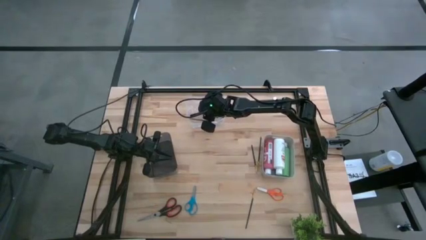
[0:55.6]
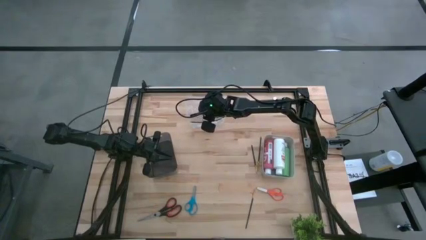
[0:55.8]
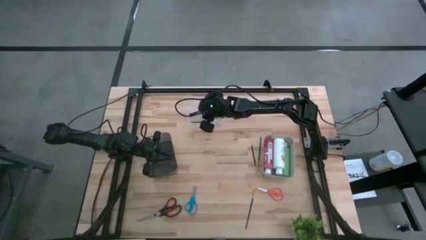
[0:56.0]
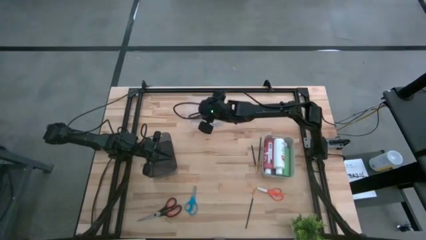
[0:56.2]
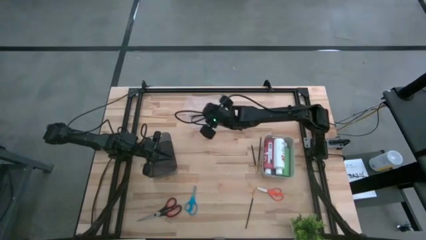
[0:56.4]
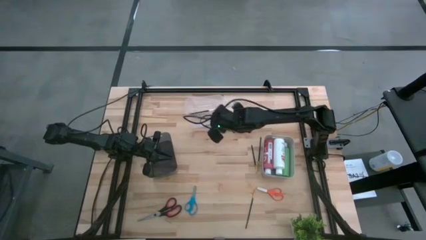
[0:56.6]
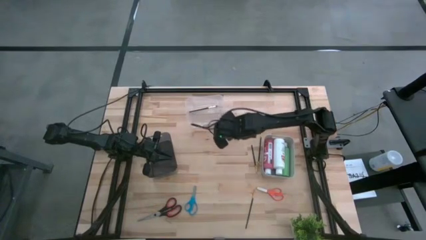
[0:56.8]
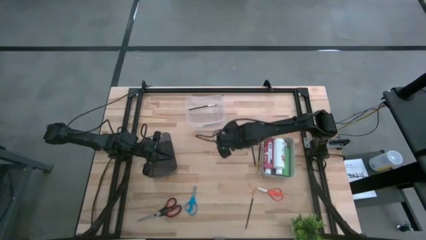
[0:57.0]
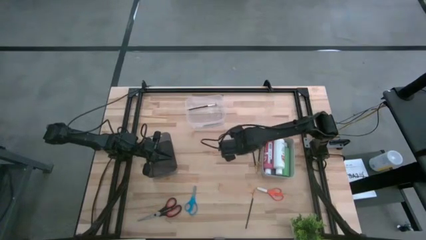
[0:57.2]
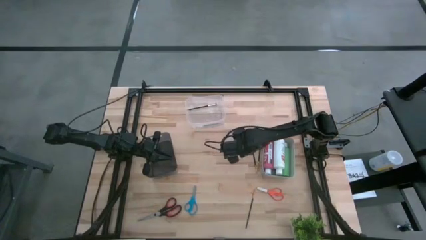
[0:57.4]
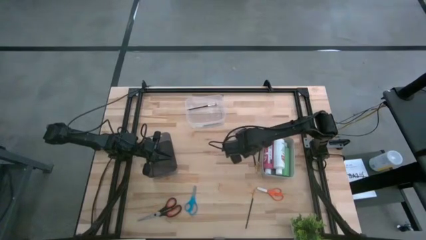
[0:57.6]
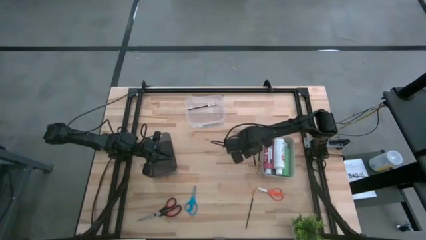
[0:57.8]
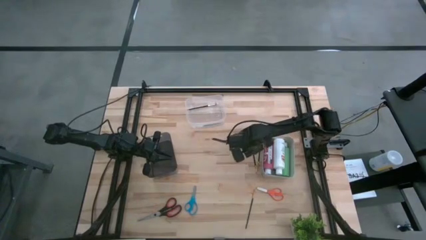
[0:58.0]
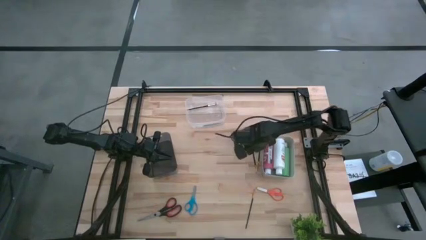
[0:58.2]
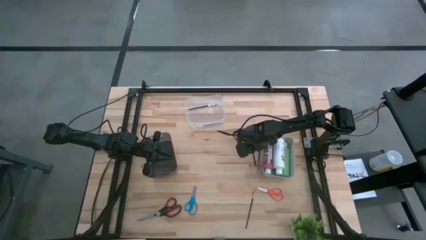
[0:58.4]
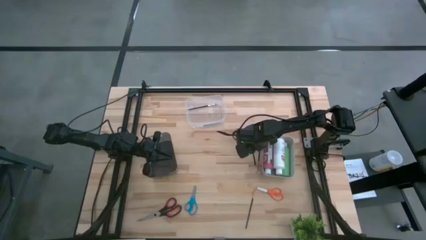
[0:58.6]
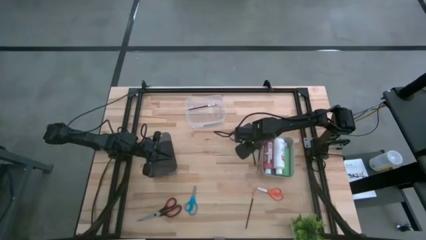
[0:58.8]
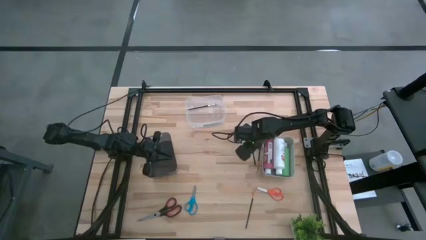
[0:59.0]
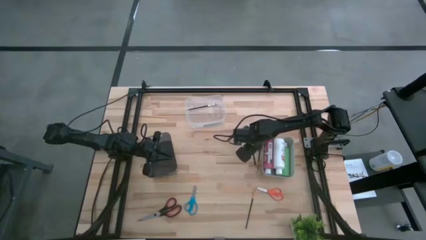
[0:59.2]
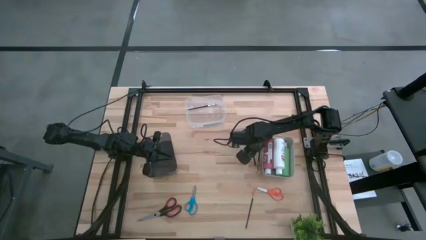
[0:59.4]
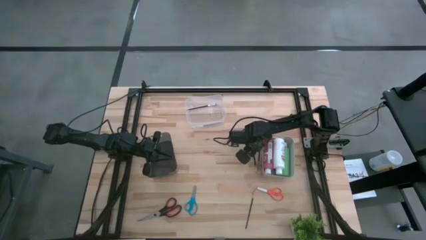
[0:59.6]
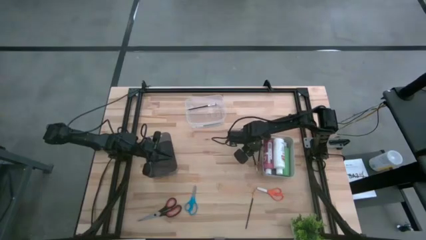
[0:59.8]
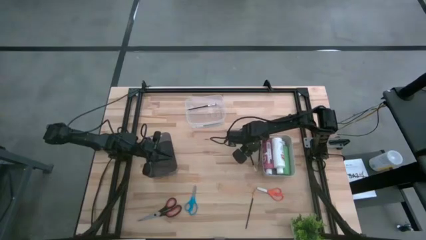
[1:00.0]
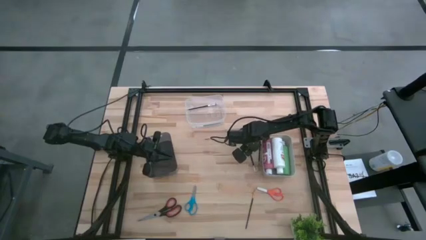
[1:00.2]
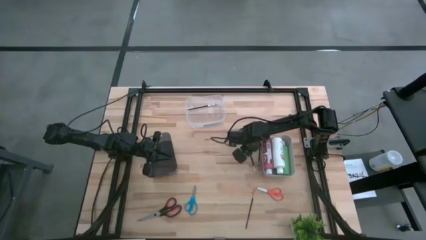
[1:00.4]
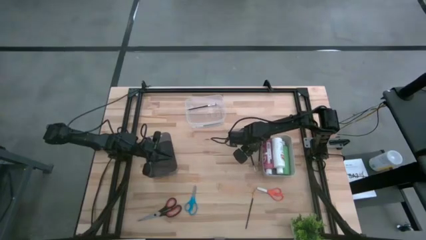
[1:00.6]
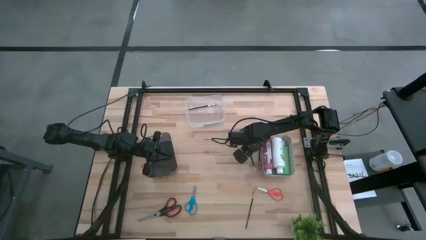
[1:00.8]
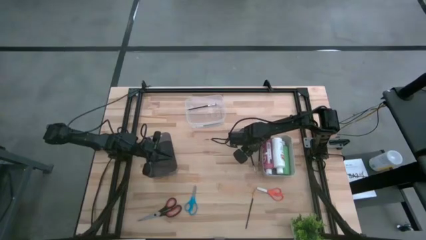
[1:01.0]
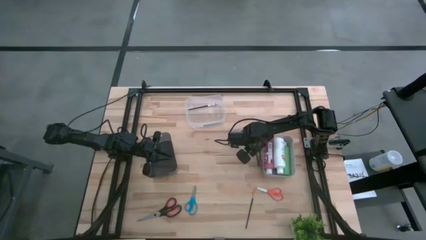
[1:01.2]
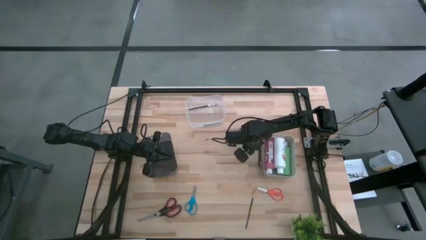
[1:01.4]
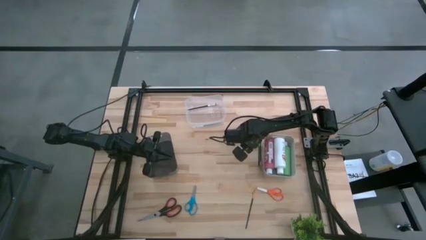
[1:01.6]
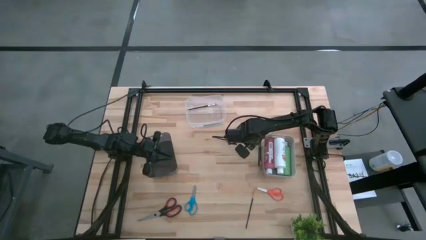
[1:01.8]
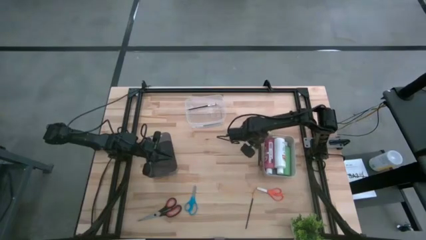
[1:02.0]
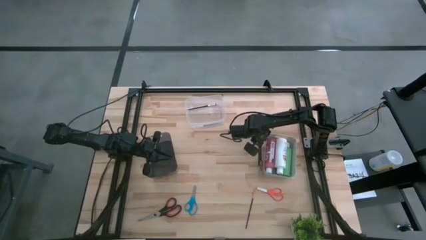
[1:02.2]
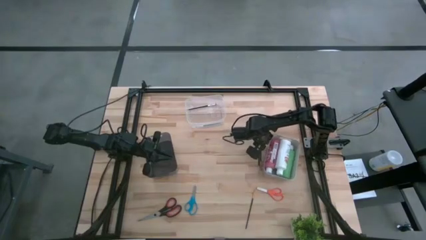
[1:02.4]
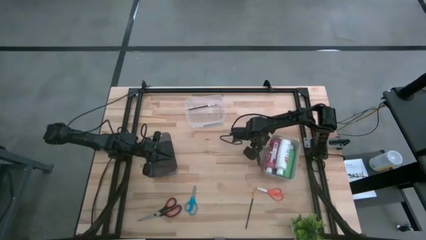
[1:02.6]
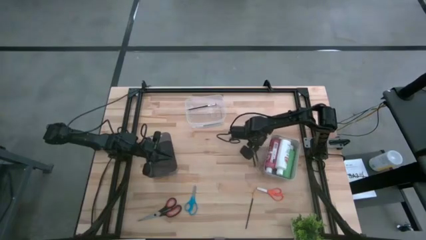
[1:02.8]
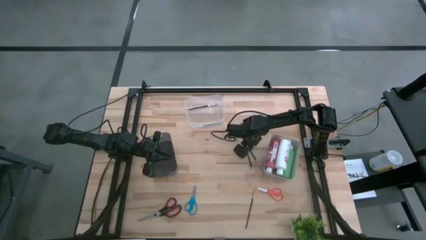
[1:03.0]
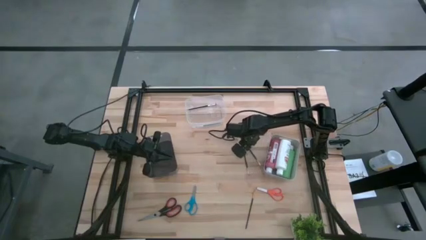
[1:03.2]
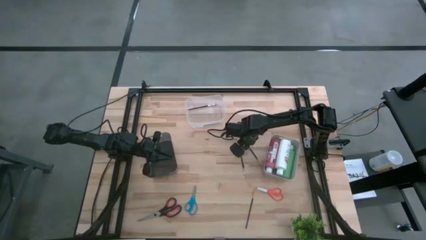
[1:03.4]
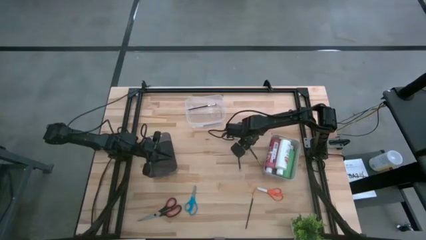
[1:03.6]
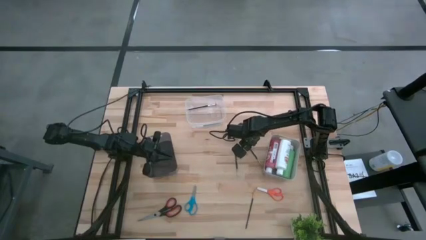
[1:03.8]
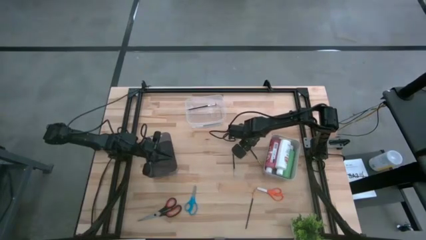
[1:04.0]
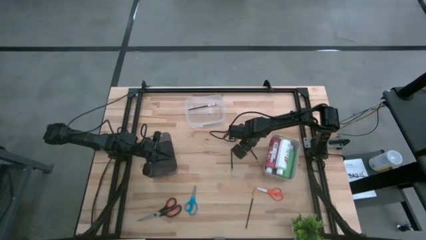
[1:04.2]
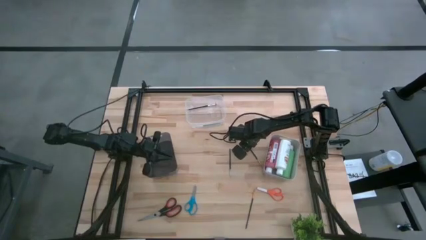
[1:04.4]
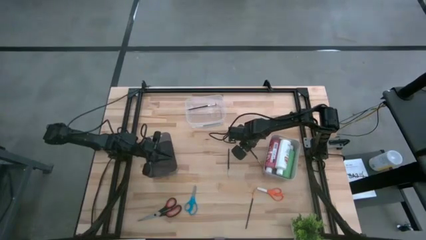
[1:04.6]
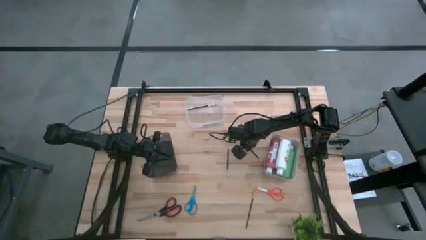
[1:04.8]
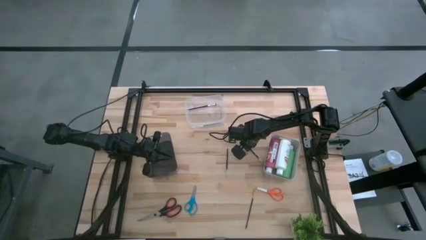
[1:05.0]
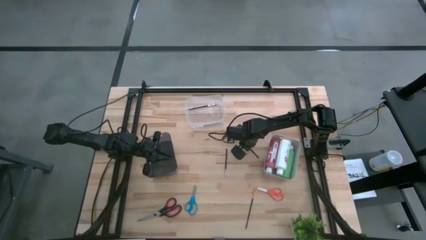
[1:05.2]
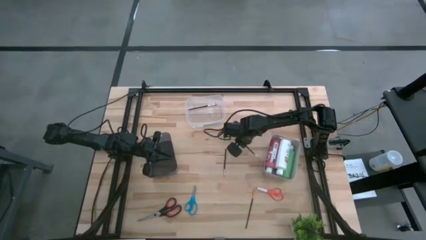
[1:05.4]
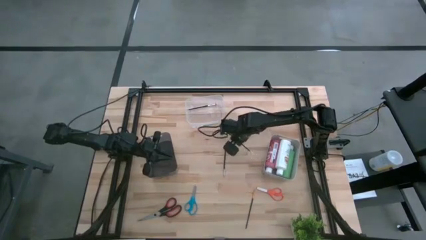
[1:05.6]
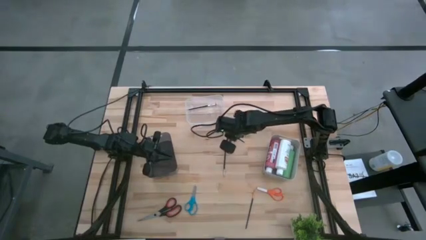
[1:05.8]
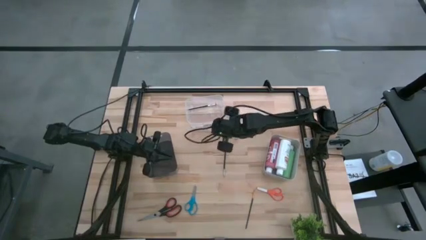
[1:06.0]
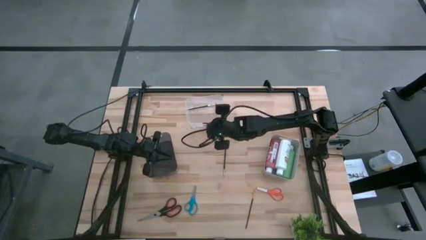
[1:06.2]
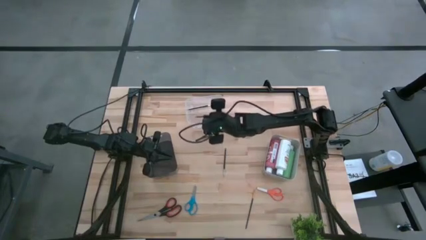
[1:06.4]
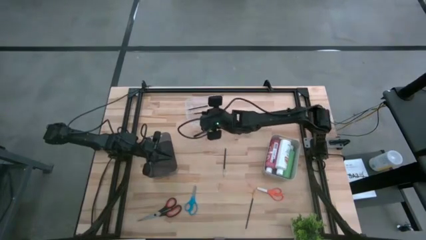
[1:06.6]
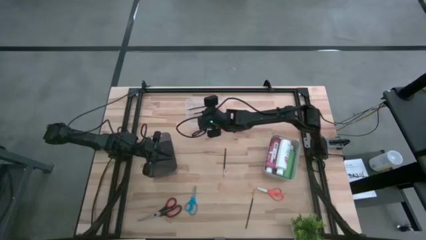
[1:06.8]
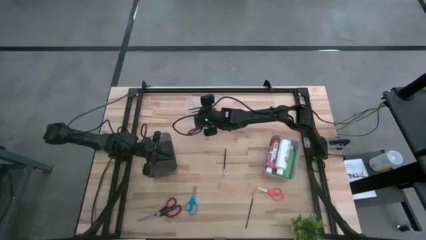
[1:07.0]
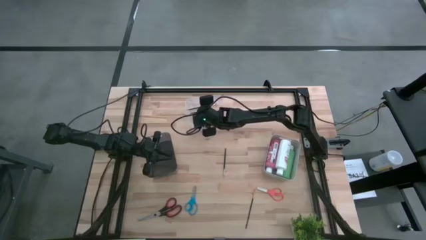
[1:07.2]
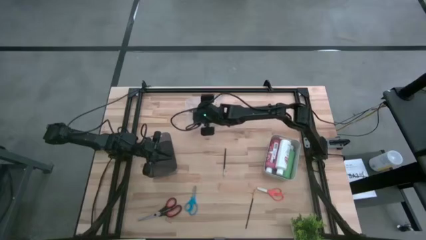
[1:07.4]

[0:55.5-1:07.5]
Task: Pick & Place Paint Supplies
Put the gold paint brush into the transparent bin

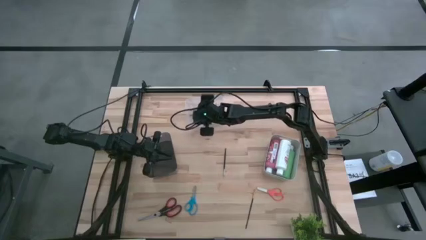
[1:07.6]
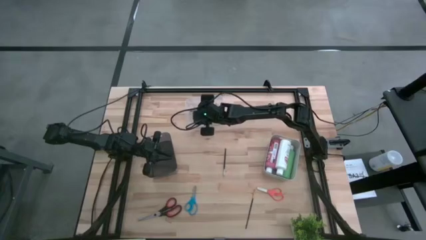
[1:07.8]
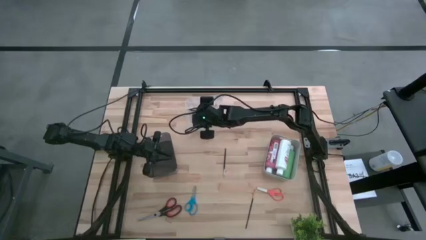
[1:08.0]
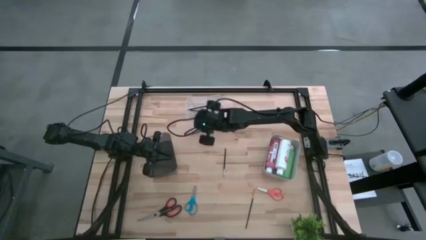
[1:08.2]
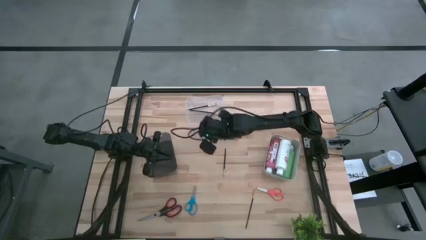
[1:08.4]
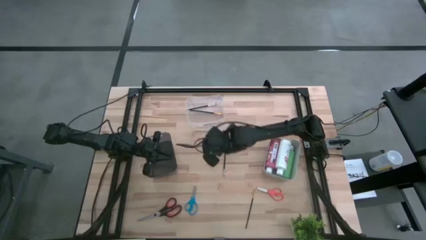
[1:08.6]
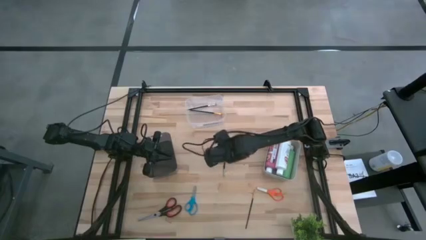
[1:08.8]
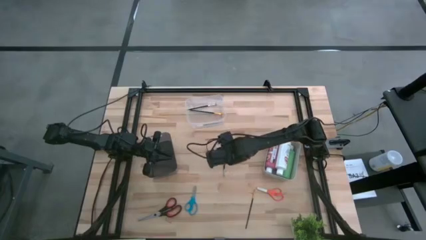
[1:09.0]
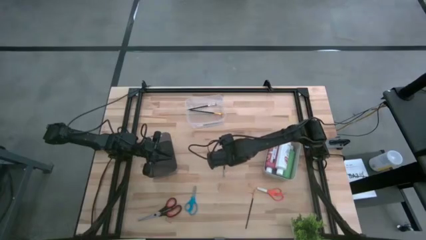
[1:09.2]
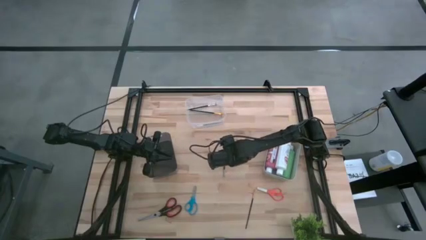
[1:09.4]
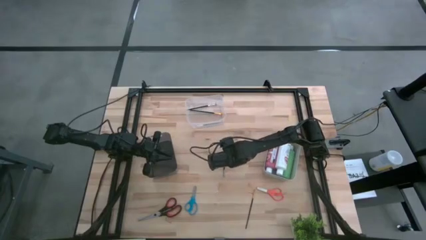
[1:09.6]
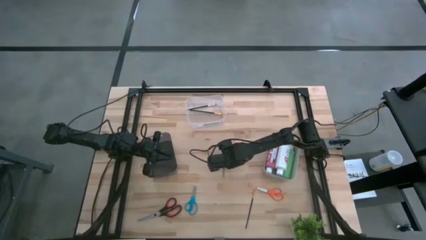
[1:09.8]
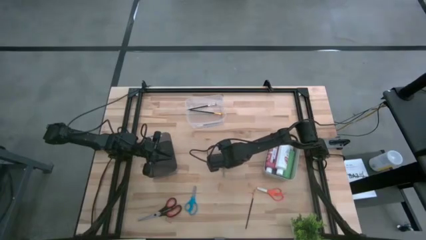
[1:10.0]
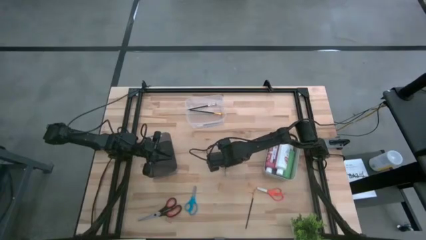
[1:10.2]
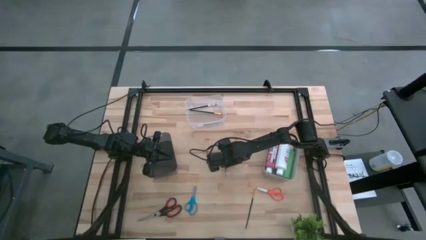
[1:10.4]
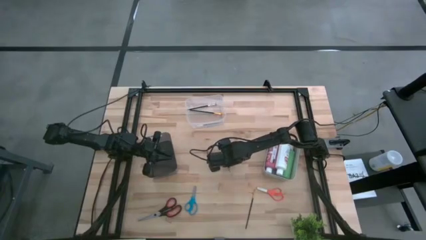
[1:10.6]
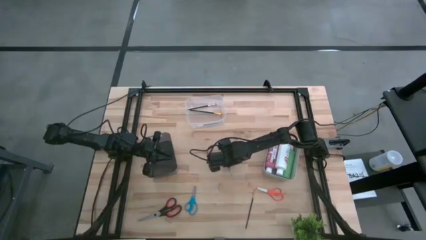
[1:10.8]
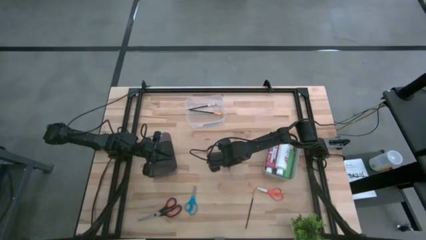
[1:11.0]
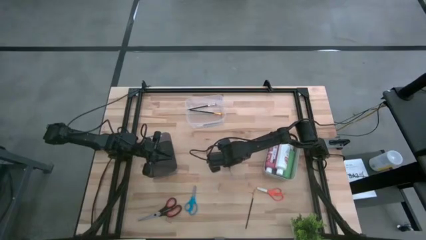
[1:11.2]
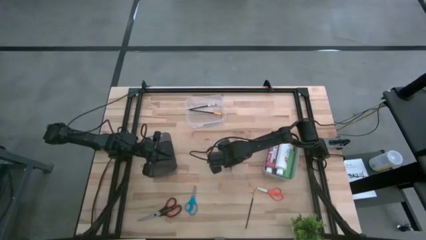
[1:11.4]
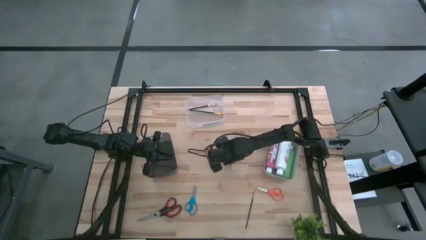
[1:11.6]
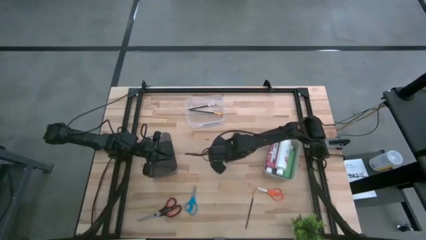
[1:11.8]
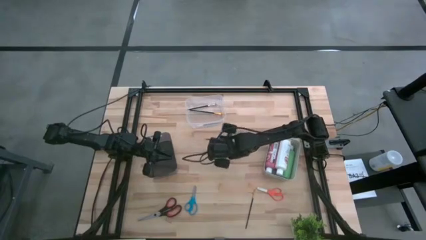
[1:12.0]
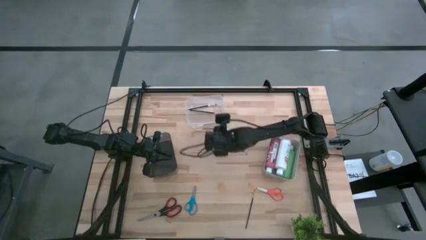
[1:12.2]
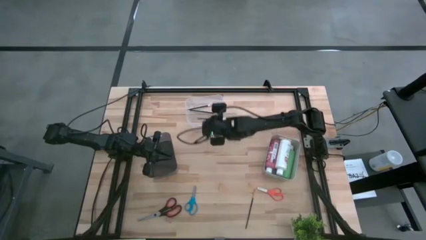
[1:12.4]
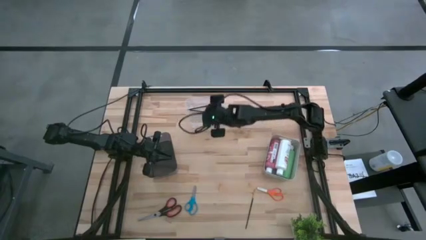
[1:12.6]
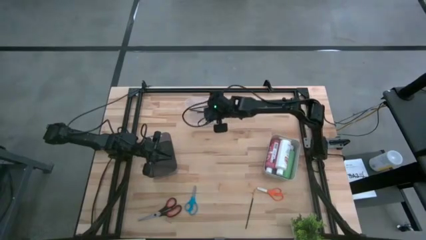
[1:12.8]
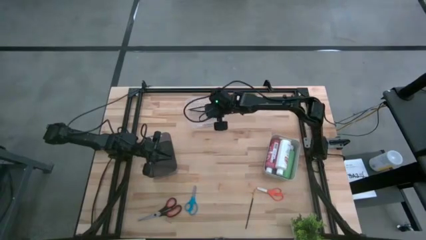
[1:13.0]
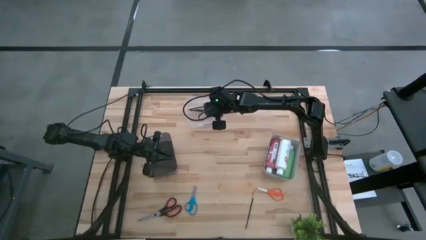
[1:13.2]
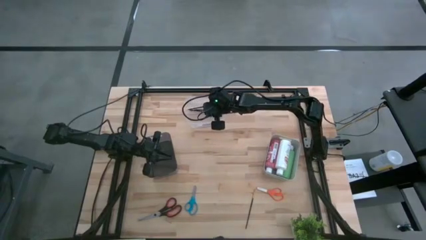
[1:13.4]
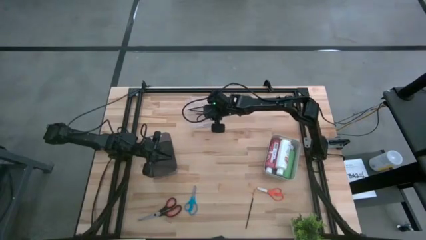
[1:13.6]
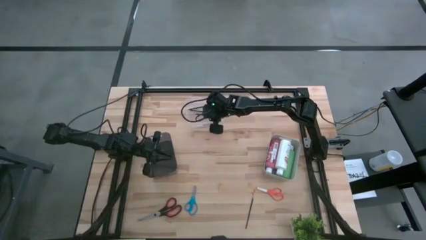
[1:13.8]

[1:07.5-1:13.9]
Put the silver paint brush into the transparent bin
